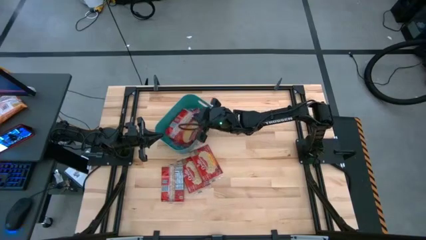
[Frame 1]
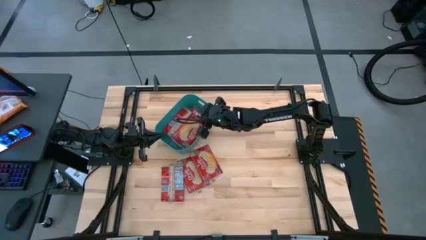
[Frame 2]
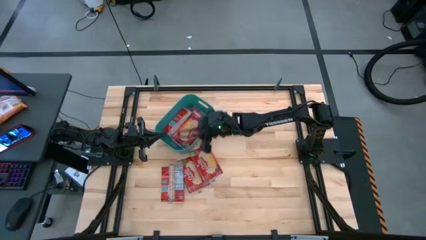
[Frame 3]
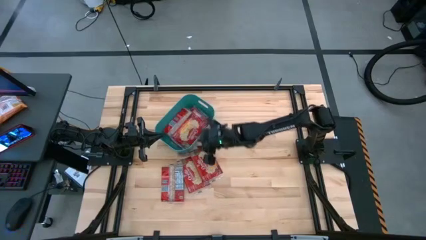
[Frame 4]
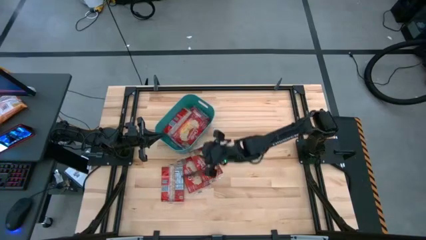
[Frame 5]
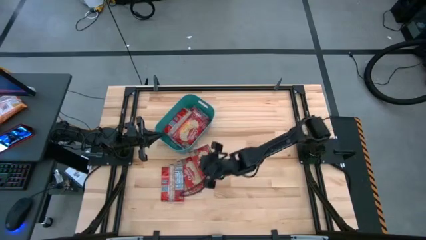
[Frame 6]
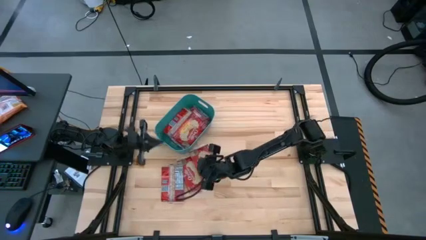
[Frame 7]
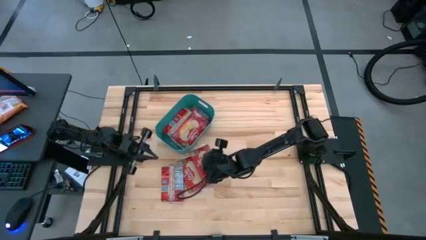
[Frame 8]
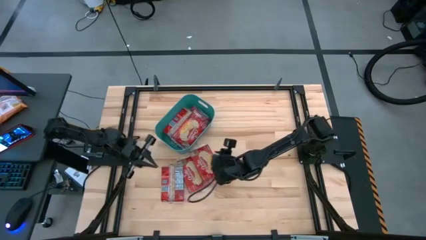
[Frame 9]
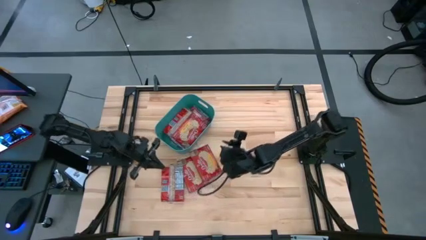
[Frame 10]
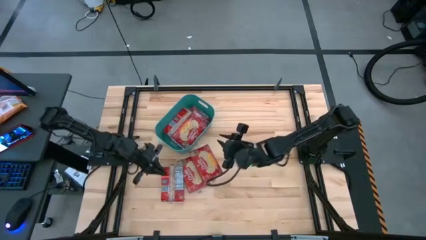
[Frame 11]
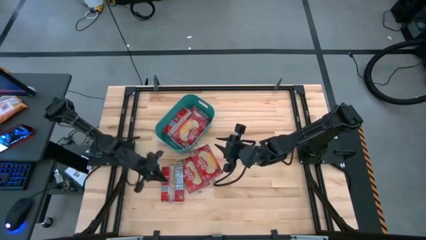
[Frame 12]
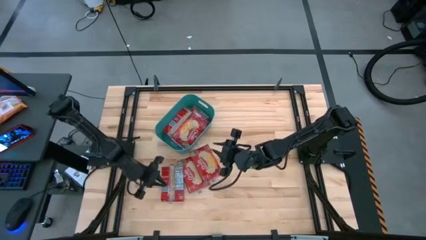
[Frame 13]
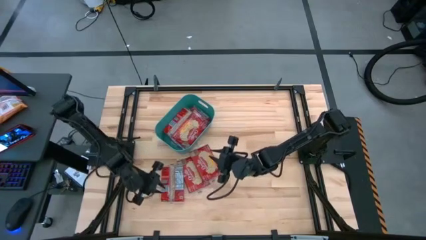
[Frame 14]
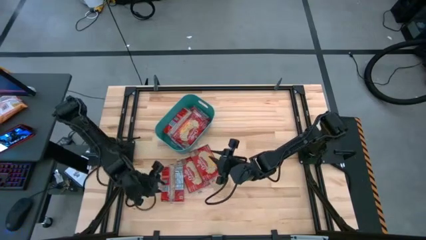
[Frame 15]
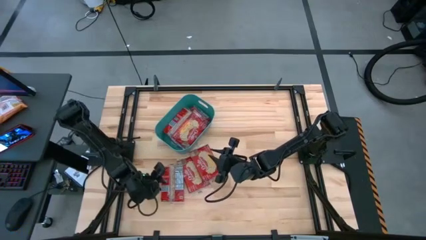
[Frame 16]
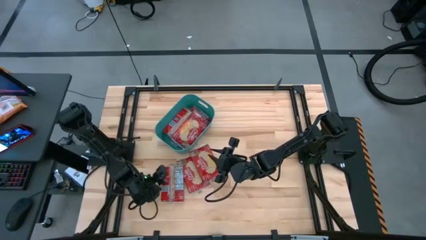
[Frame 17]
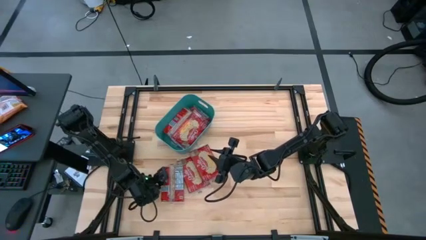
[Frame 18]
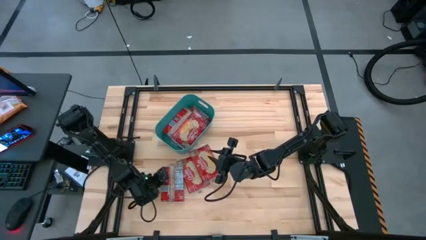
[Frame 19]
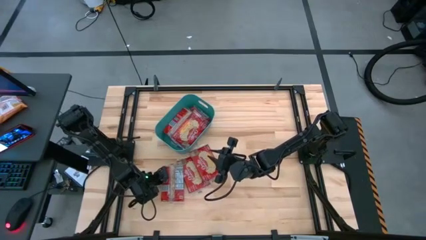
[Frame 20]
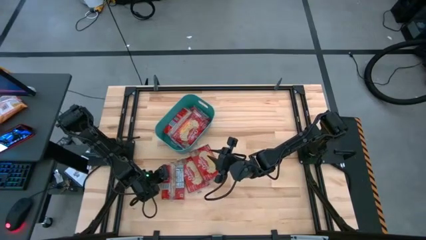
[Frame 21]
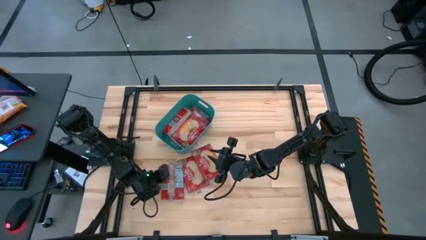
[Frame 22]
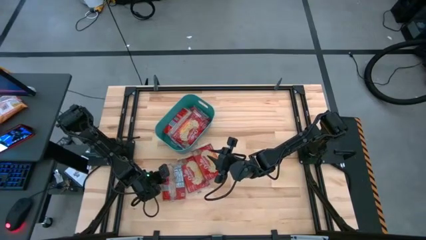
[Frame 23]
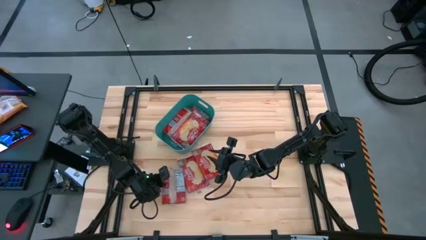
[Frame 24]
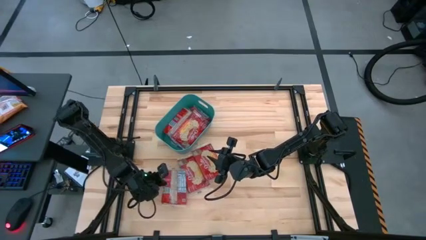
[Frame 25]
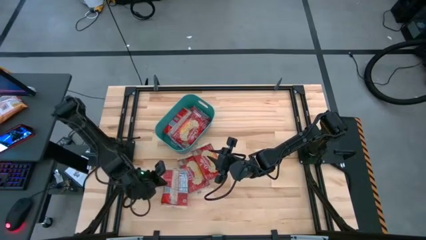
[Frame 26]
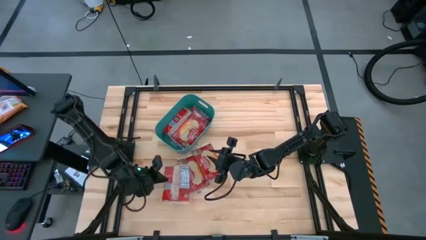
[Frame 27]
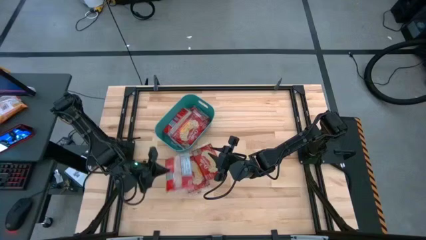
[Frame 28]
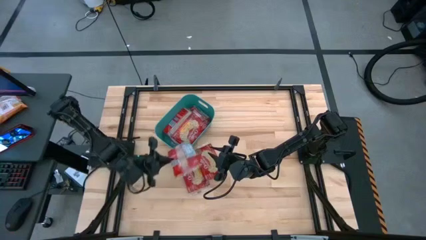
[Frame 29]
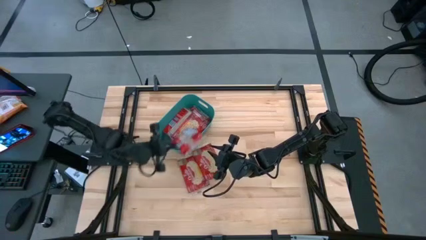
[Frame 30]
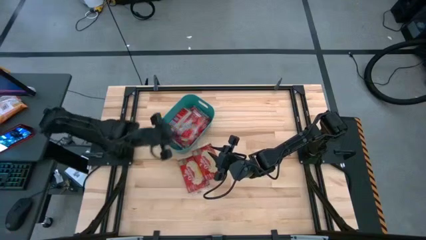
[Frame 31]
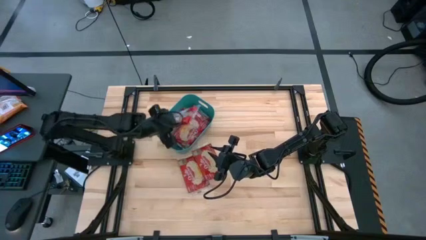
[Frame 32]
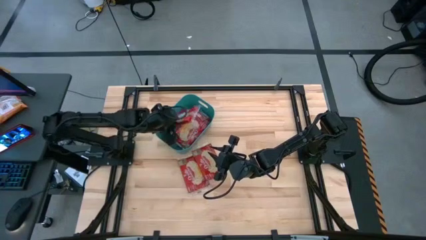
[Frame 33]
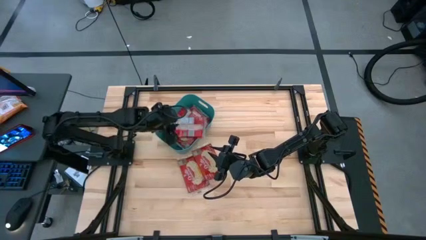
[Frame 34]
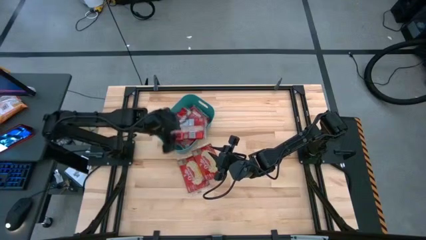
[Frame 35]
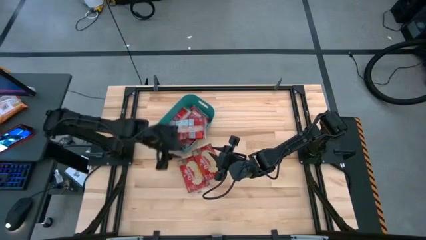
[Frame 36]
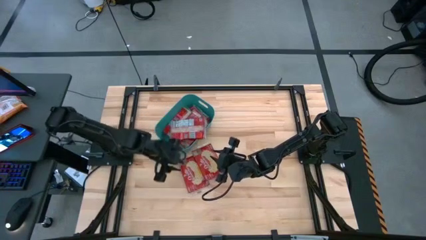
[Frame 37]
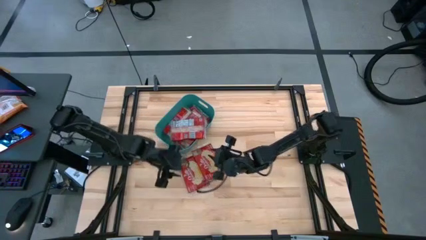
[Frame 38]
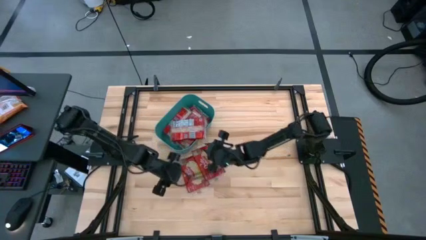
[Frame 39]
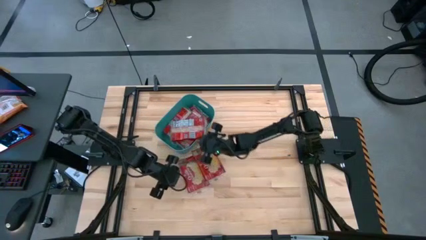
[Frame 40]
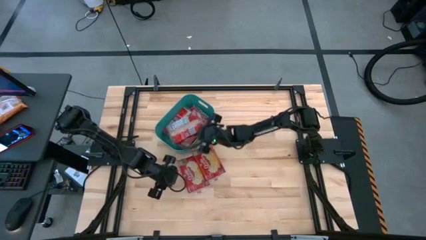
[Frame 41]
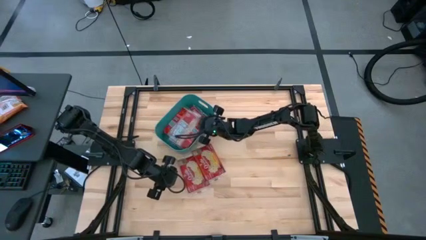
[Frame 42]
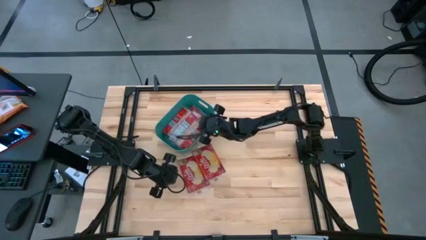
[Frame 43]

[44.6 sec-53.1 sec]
Task: Sort popcorn bags into baskets
Put the red popcorn bag into the blue bin

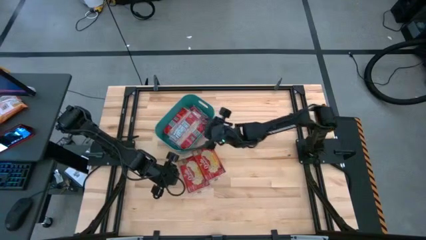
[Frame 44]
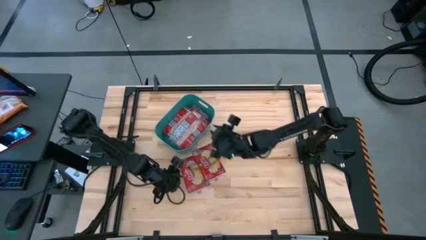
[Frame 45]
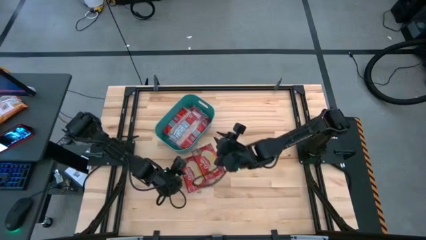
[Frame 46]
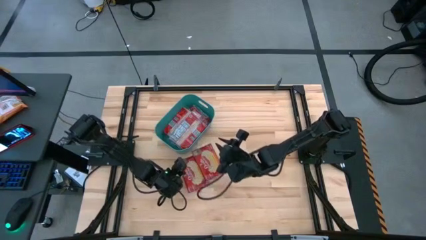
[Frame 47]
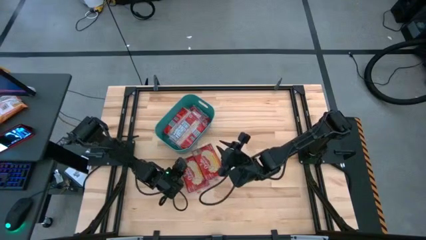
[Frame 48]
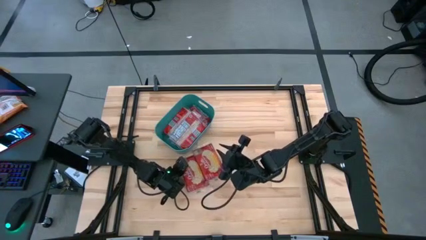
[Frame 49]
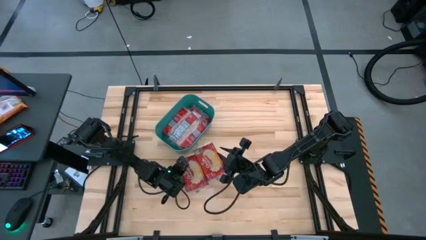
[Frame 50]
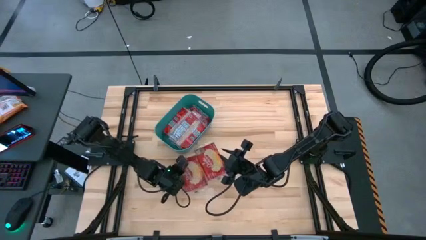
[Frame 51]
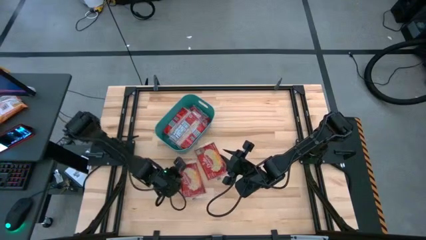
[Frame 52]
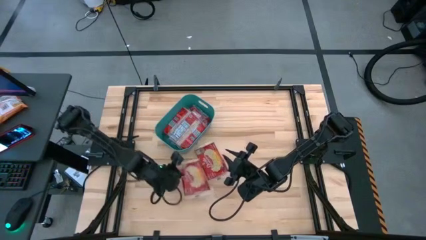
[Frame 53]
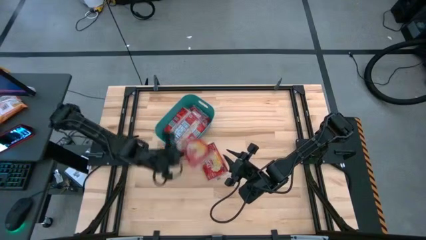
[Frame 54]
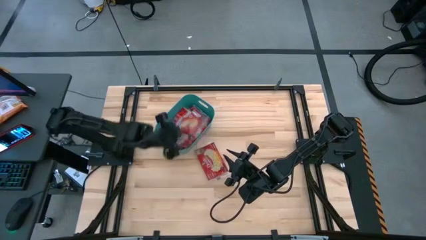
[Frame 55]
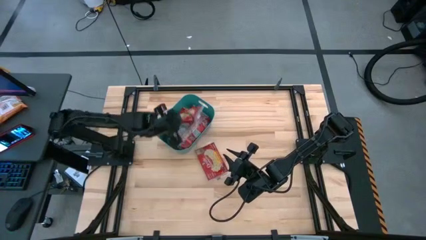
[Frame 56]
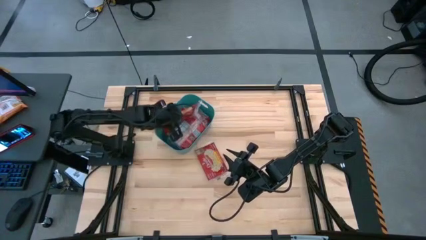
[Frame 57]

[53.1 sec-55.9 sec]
Put the red popcorn bag into the blue bin

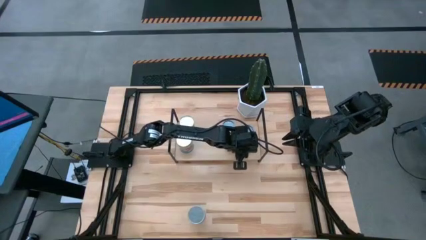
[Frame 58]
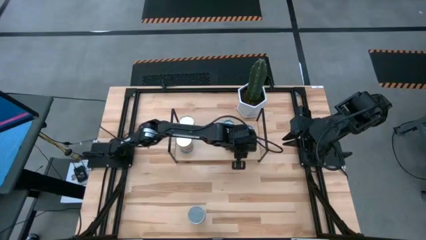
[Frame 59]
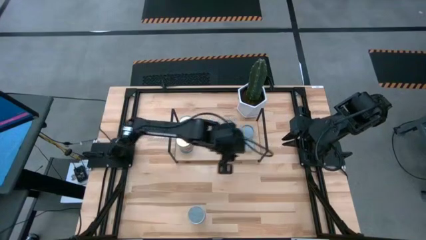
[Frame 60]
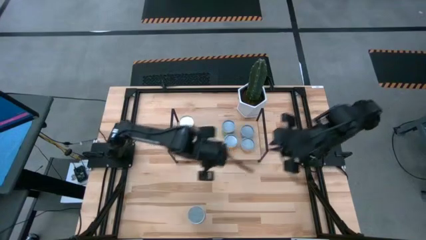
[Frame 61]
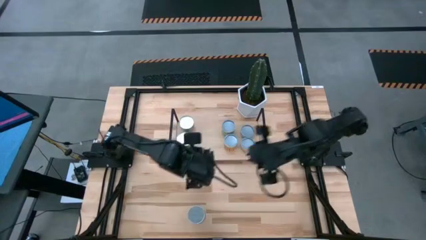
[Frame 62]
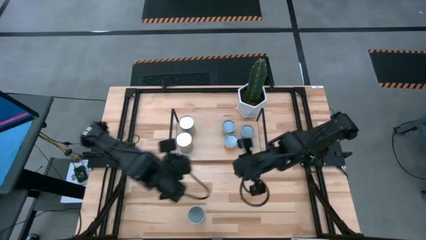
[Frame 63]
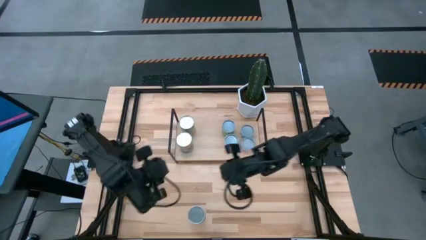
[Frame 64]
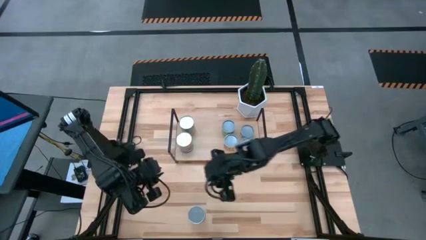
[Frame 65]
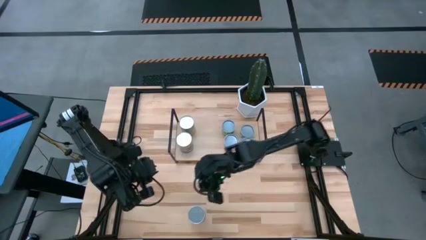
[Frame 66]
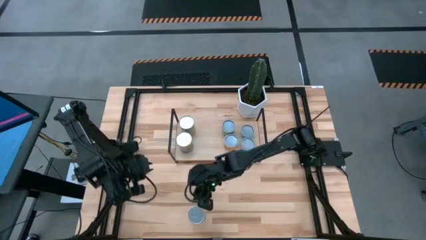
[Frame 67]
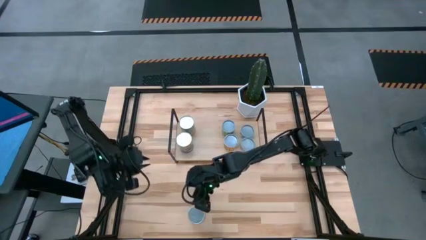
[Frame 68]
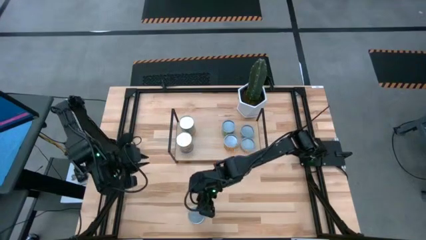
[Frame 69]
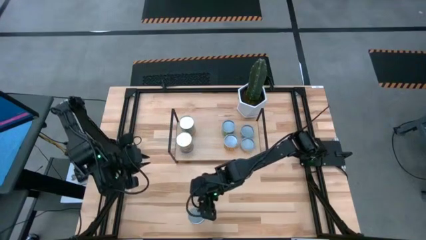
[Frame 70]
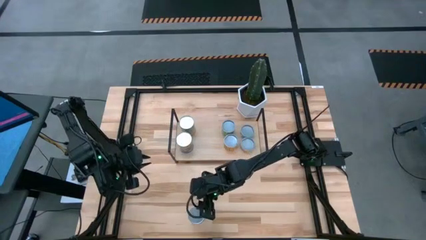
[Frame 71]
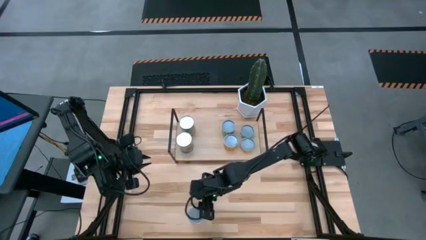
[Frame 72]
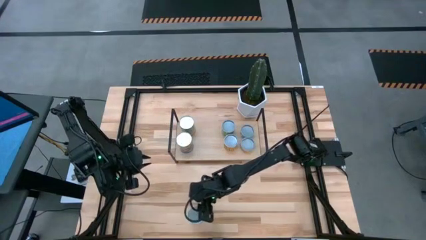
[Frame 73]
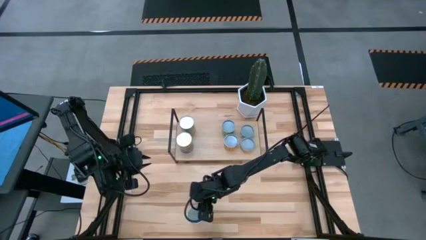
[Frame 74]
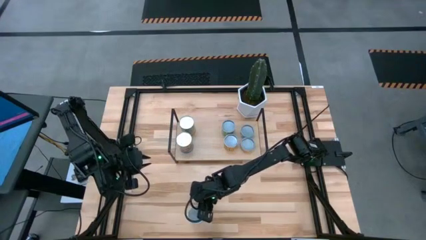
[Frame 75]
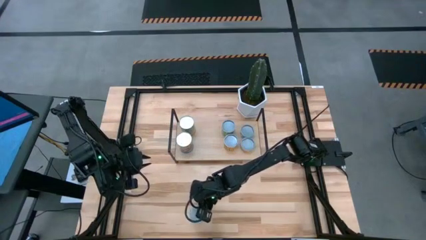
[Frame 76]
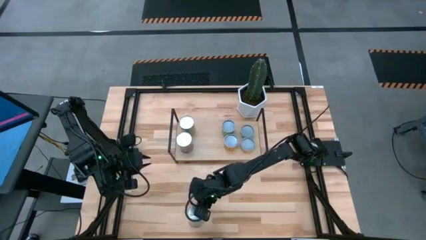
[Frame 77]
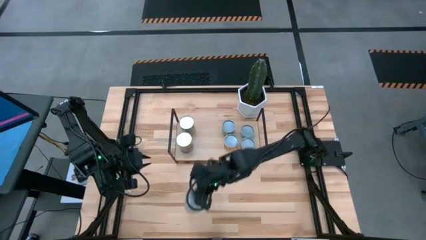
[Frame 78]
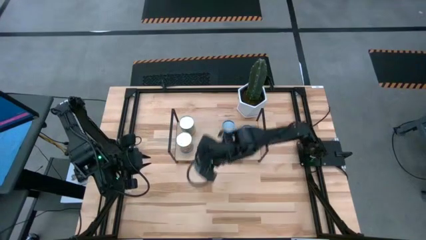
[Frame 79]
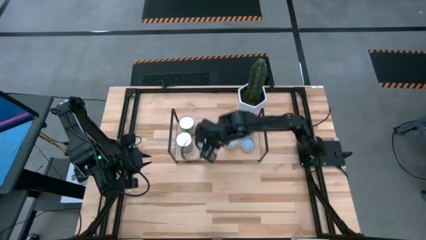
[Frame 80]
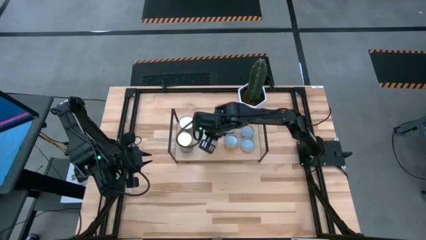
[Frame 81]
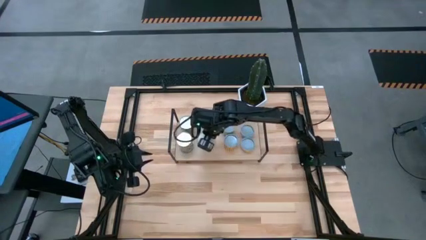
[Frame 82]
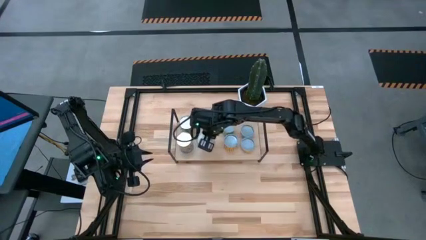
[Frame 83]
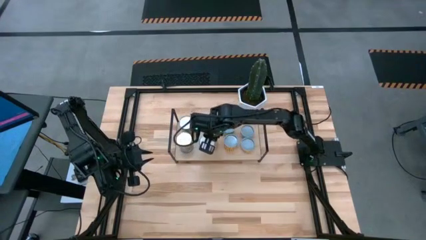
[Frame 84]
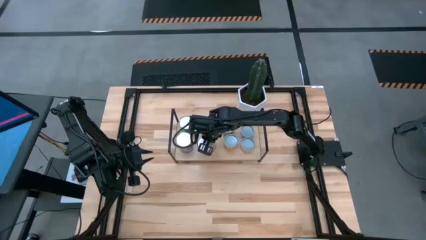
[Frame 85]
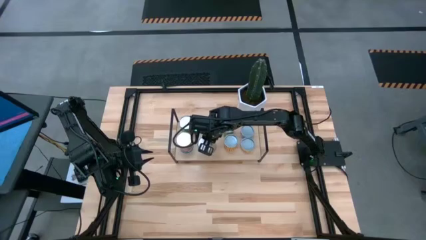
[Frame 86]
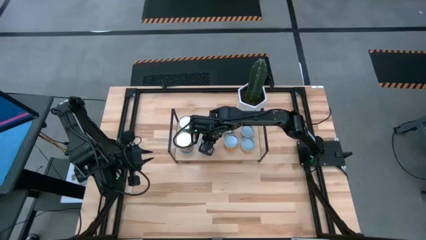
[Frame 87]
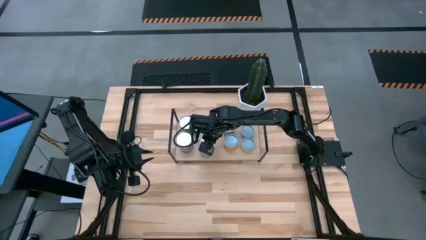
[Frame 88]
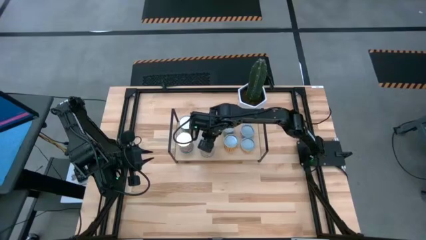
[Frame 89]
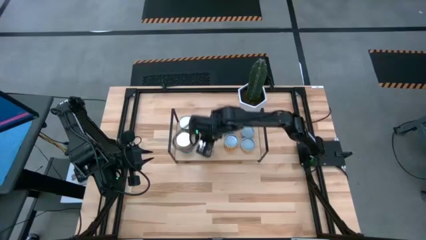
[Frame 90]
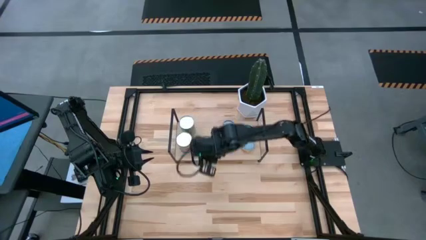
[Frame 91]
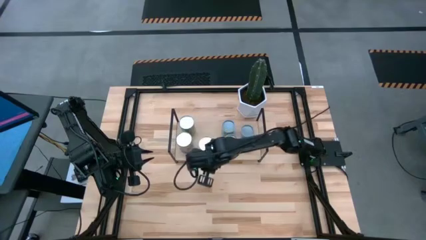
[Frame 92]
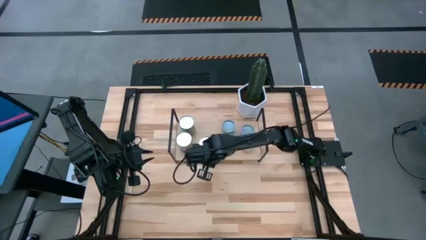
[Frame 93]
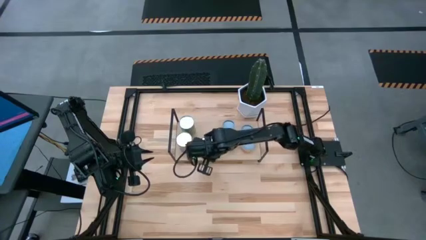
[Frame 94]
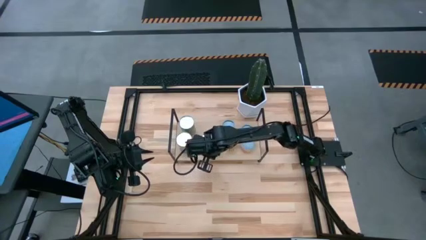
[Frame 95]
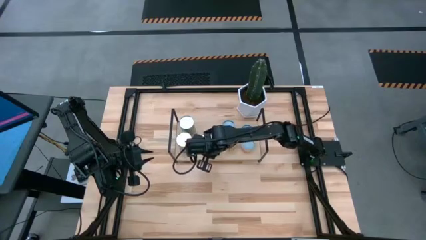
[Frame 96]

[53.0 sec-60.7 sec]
Task: Pick and place cans onto a shelf
Put the big canned peaches on the shelf
